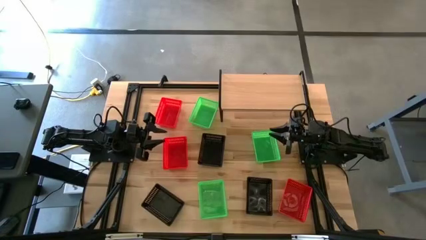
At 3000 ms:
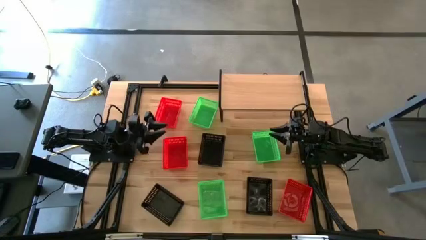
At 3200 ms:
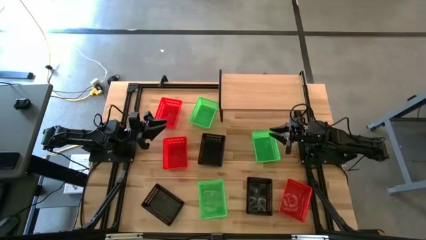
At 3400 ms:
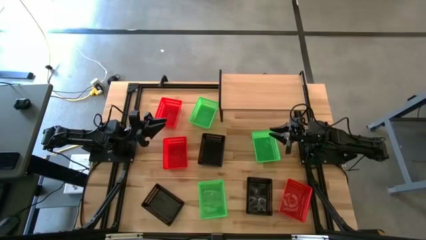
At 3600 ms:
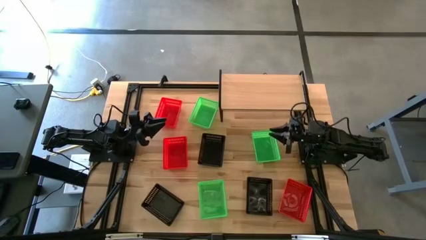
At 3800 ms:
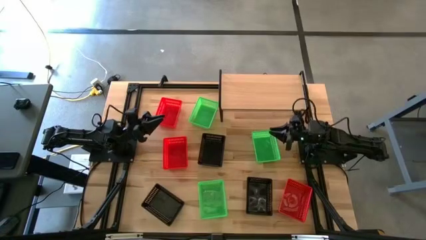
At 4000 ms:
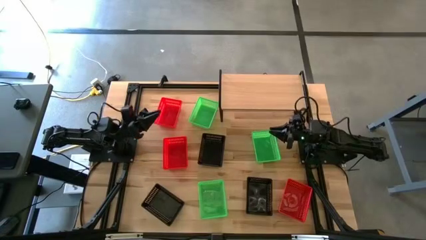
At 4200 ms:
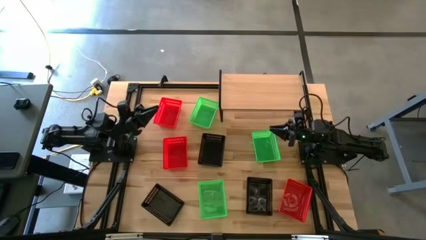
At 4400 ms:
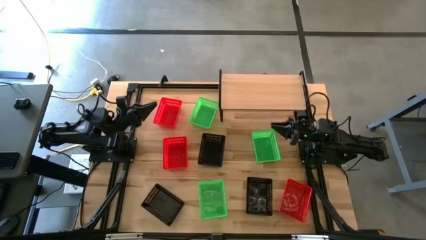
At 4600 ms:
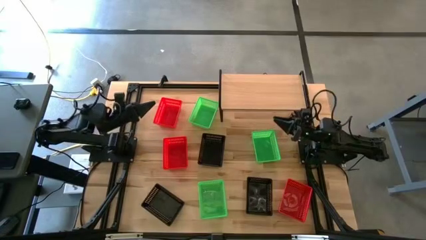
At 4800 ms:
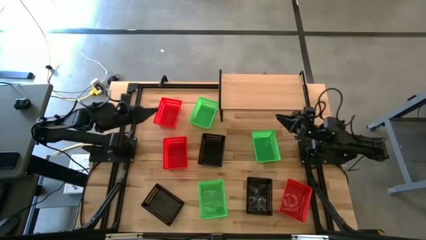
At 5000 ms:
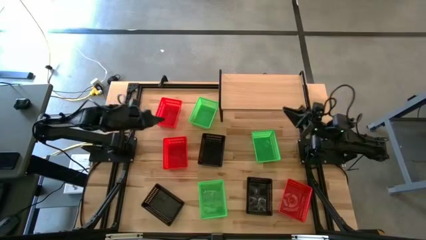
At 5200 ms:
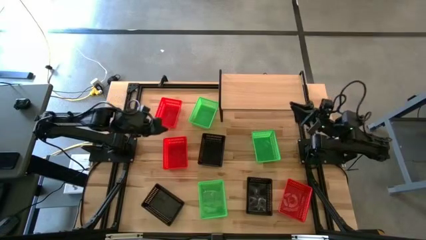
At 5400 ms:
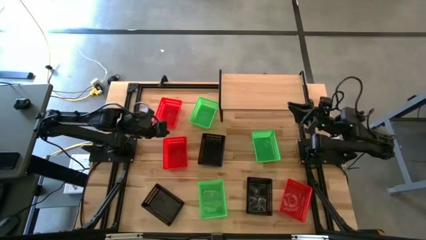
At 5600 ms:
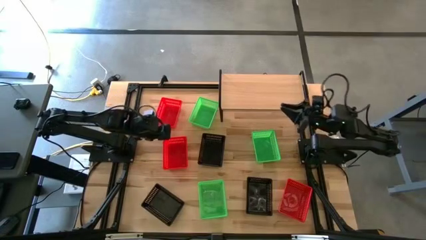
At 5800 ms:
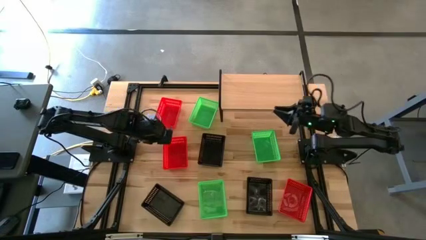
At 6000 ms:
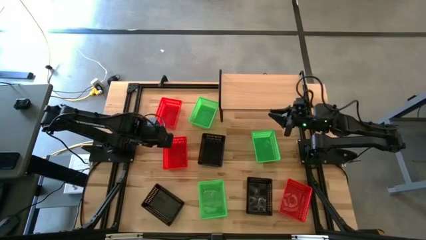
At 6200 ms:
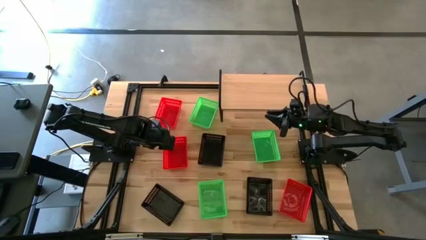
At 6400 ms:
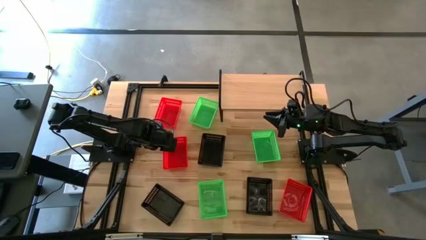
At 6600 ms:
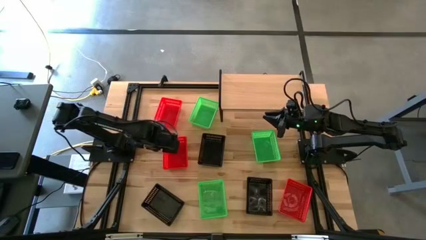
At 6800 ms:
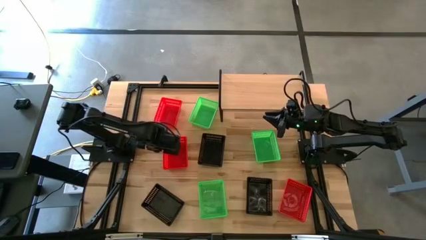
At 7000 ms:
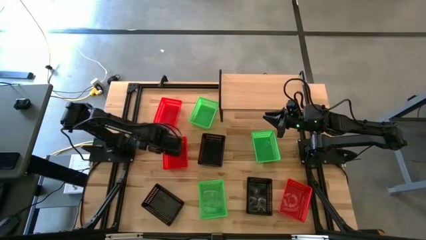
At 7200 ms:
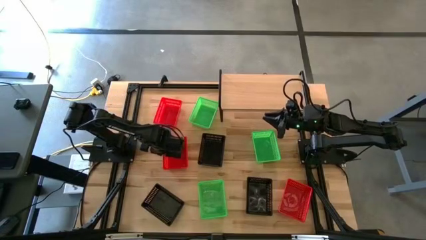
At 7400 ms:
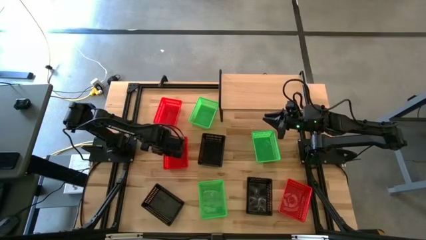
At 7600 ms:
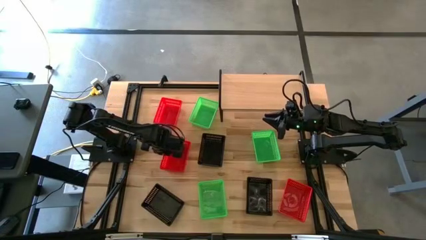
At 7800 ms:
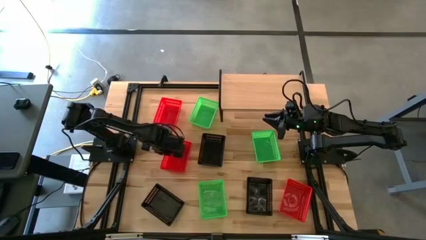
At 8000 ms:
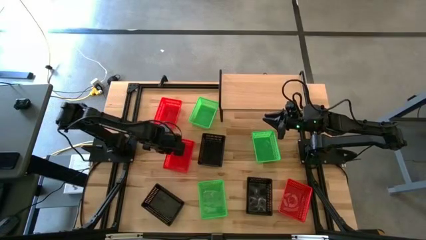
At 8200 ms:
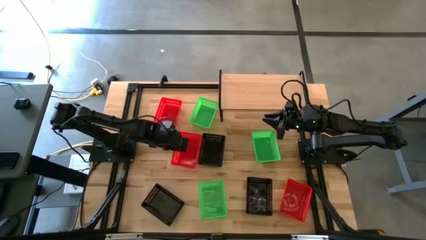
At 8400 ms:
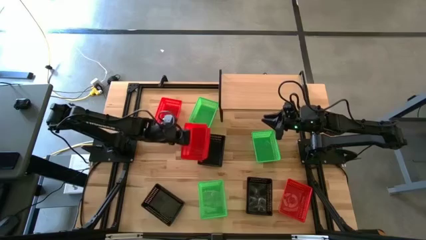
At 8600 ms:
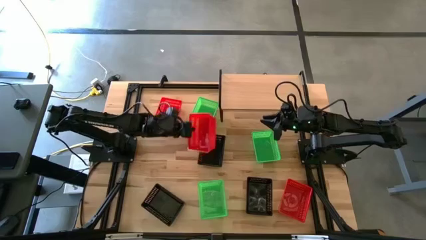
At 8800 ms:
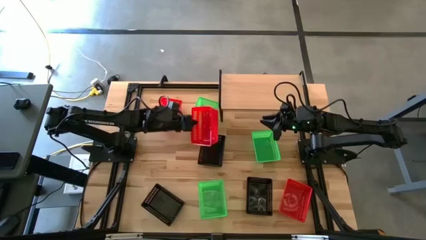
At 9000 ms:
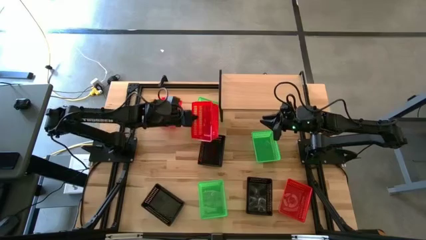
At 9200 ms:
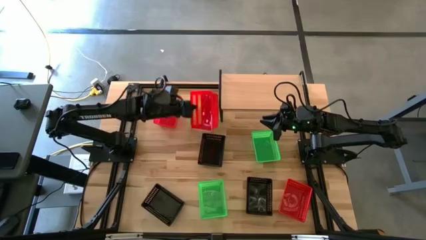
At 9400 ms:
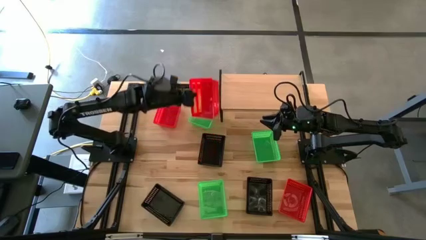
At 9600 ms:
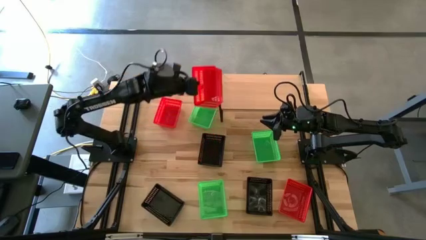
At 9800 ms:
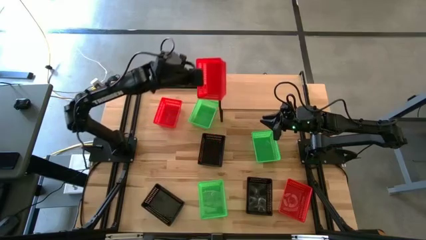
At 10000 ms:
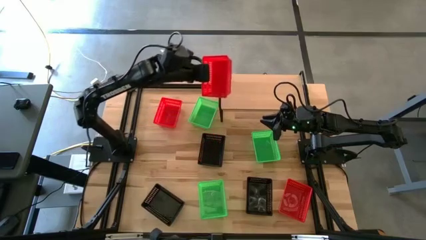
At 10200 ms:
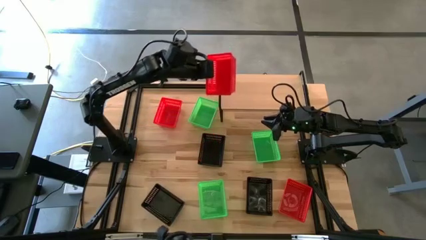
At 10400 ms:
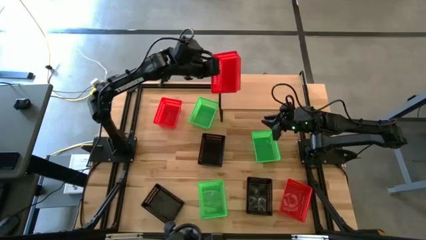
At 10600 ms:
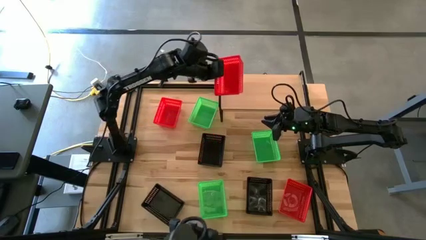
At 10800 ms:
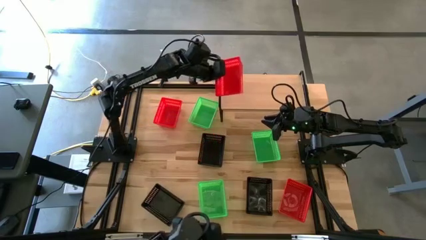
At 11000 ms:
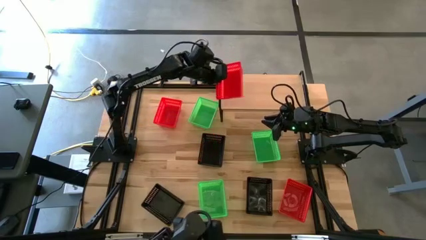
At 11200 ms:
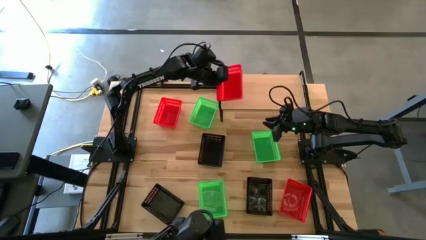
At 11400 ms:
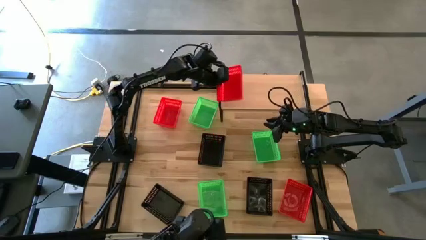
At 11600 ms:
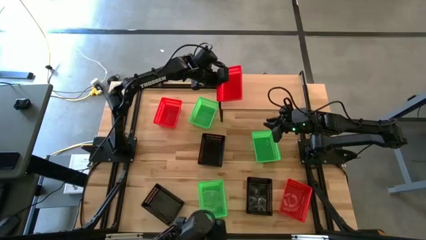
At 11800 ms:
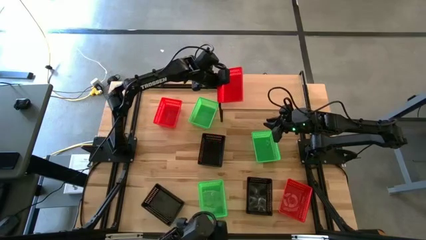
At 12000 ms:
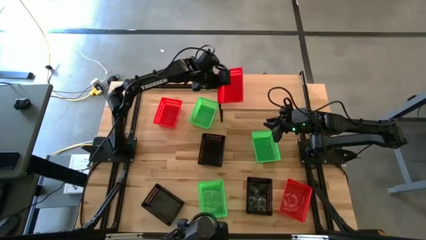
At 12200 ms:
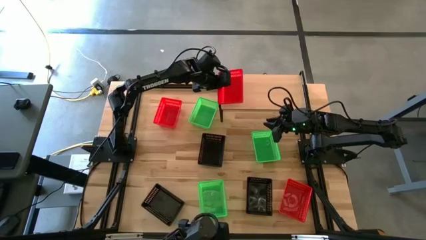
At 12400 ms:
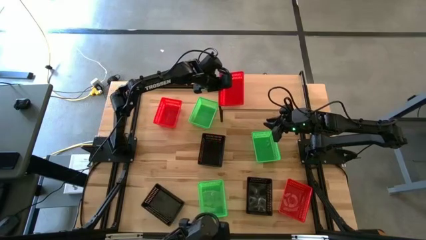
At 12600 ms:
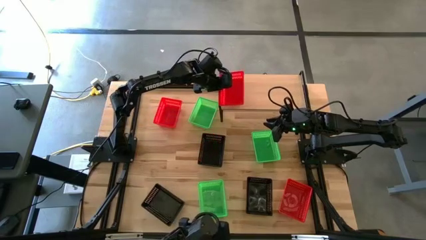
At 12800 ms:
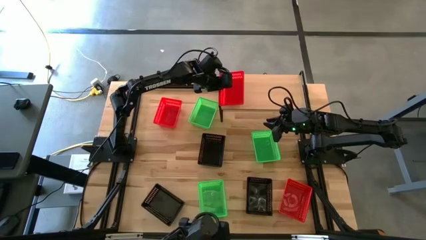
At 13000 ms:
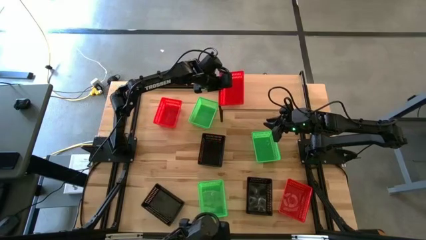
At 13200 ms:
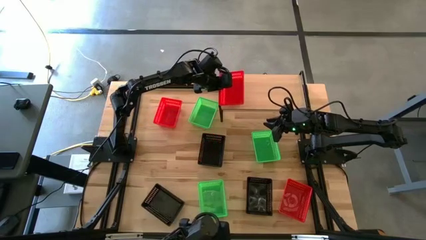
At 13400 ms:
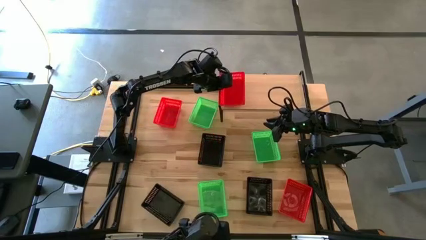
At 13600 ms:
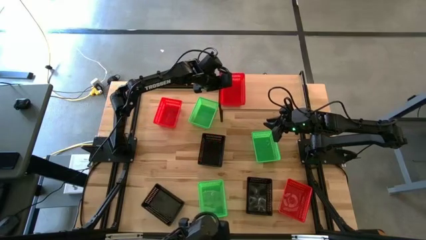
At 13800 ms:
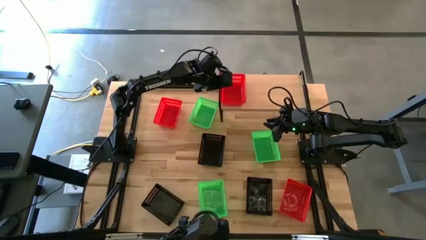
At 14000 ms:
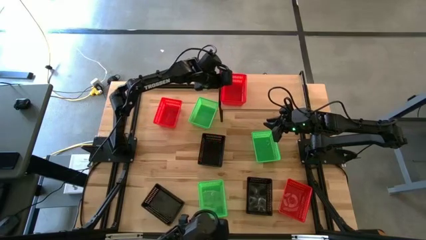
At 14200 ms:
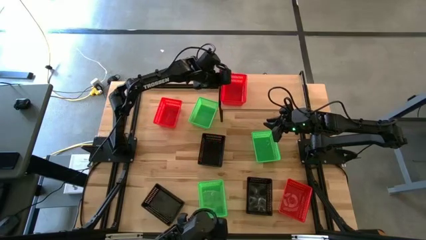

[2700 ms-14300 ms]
Task: Stack baskets on shelf by color
Put the bottom left red basket on the shelf

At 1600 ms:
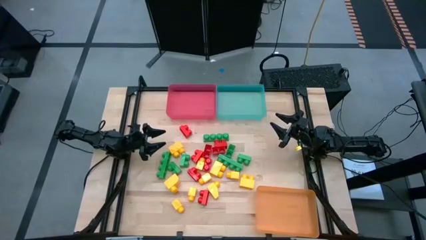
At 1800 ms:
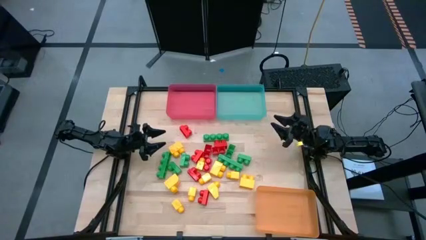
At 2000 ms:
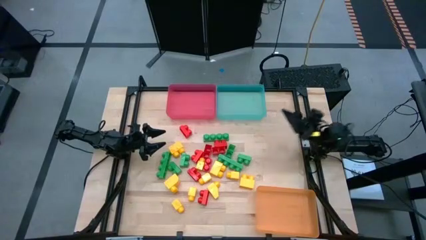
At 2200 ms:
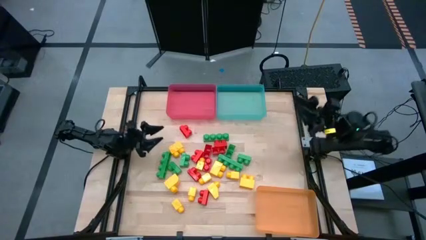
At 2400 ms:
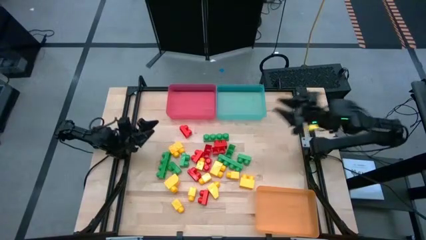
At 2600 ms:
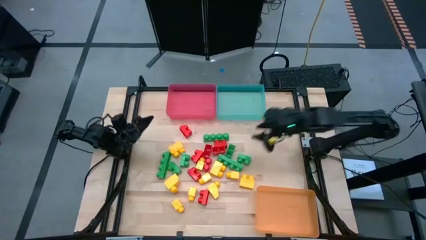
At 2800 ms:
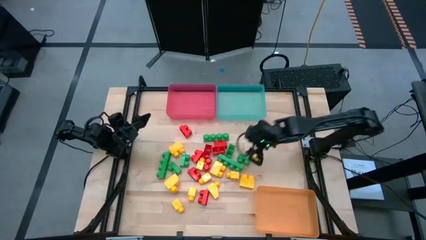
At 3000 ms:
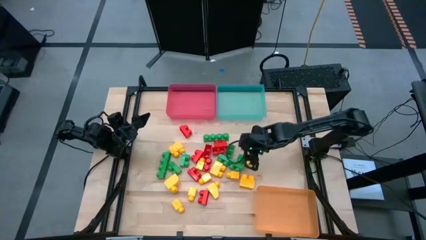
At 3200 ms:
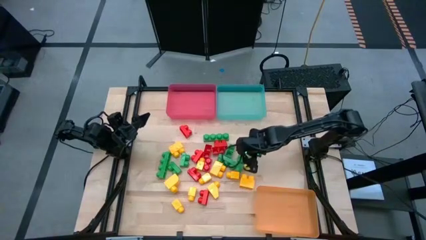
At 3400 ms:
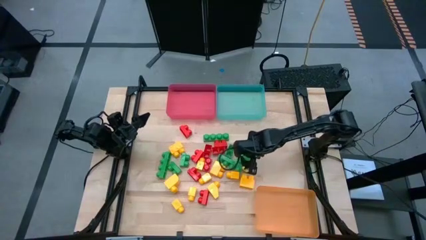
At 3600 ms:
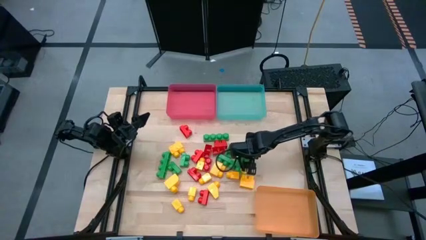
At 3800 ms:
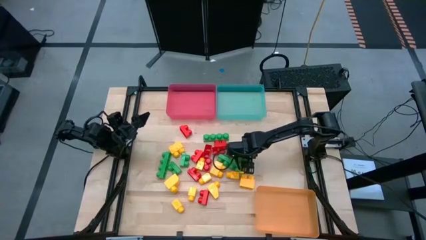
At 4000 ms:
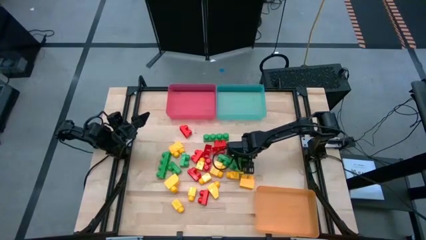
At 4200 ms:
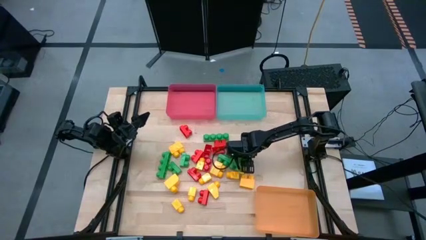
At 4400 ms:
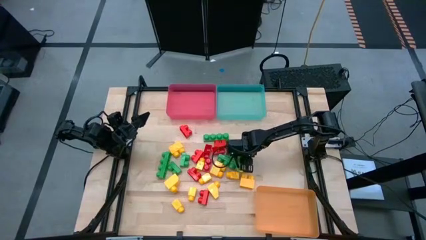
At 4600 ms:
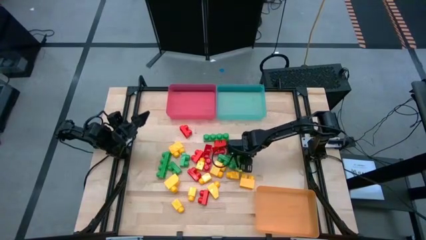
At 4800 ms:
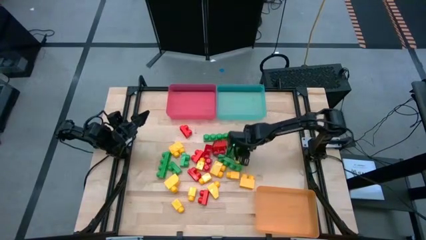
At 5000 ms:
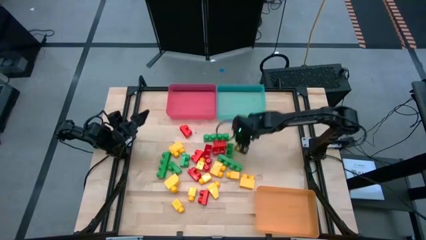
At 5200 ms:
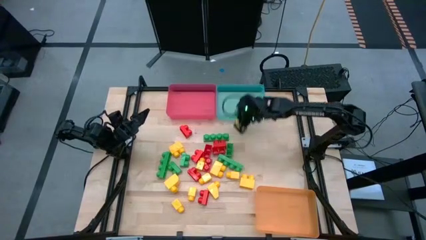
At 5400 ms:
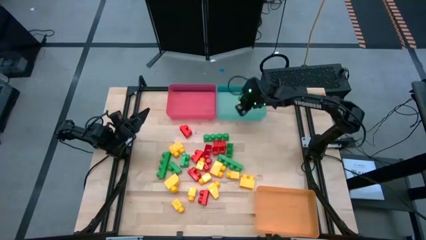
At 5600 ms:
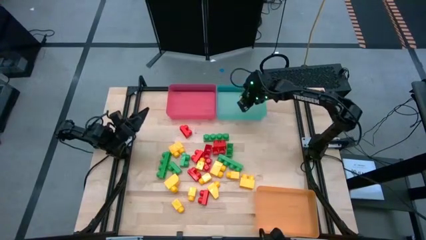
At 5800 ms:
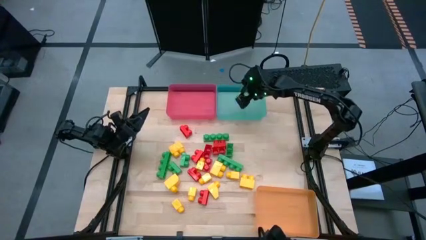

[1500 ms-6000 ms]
Task: Sort blocks
Put the green game piece into the green bin
